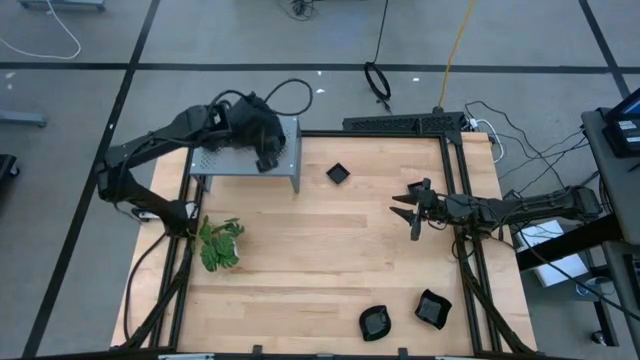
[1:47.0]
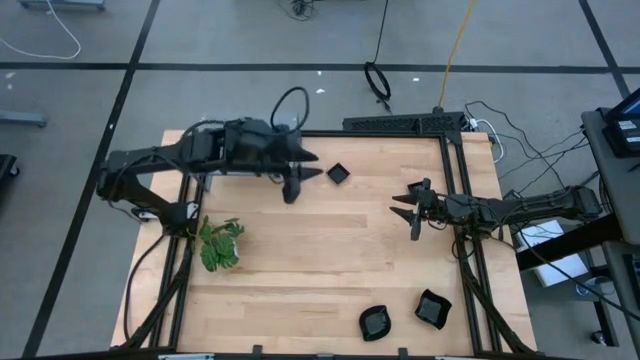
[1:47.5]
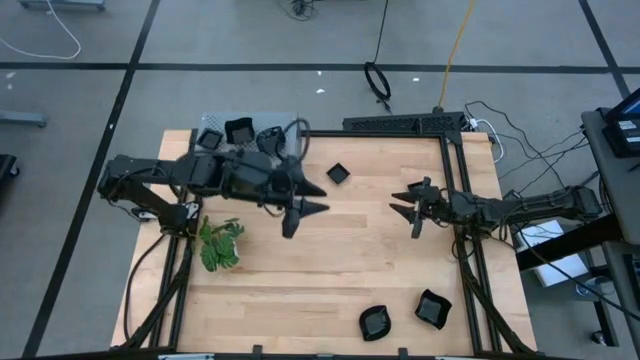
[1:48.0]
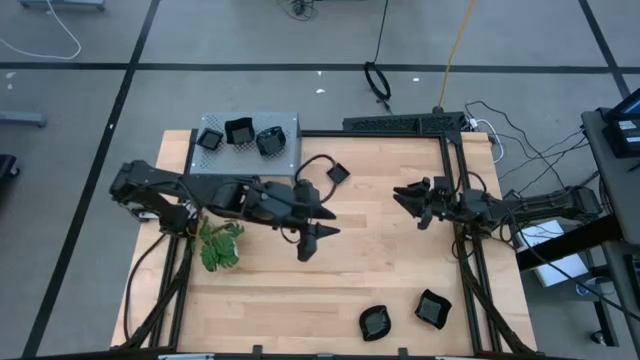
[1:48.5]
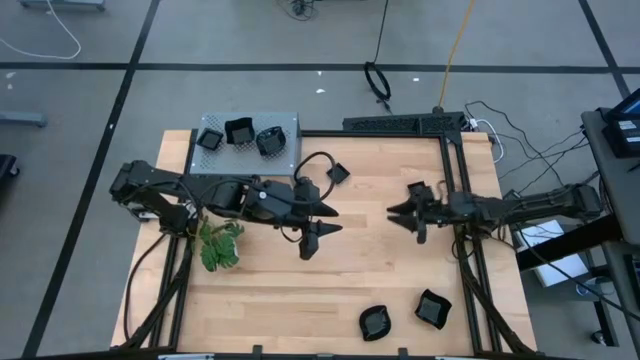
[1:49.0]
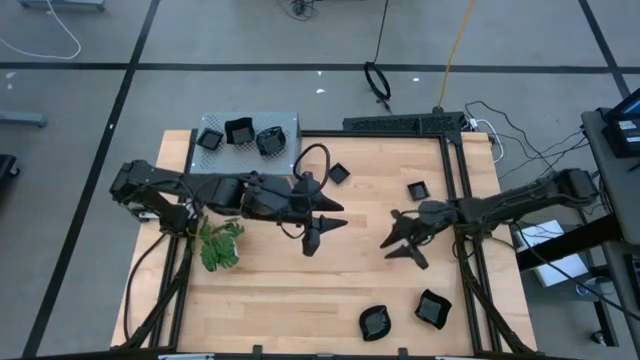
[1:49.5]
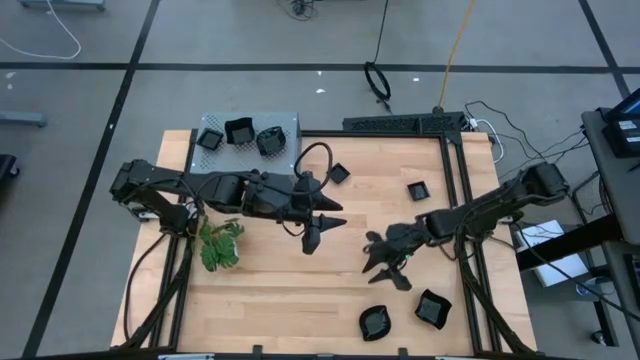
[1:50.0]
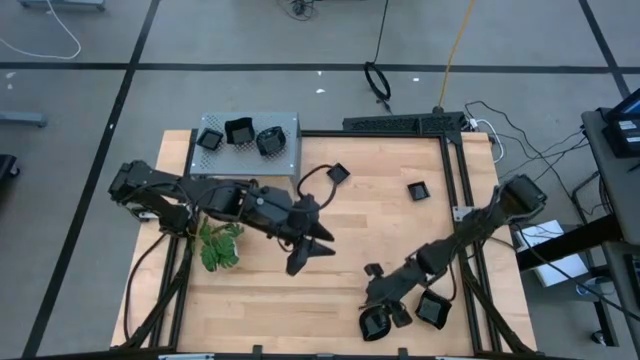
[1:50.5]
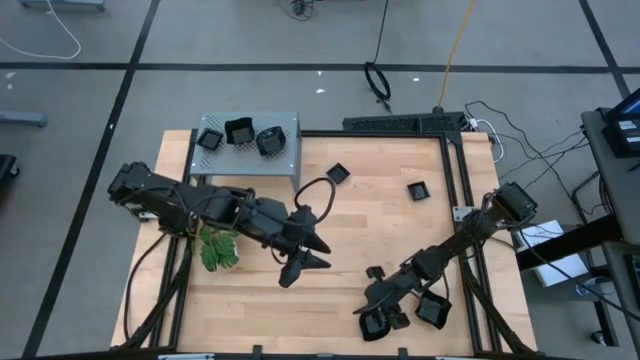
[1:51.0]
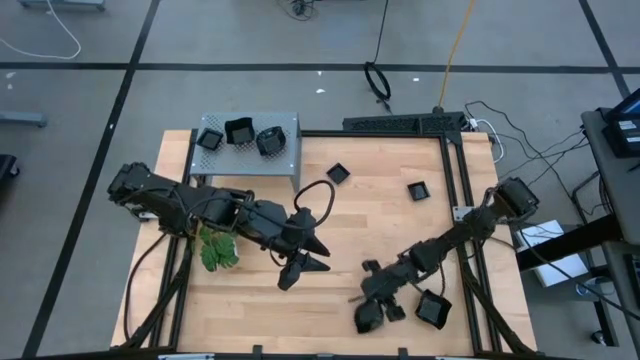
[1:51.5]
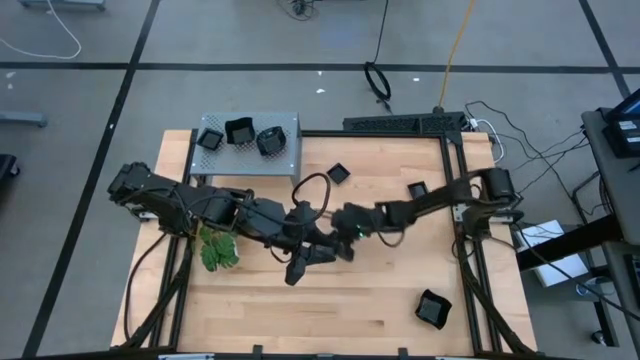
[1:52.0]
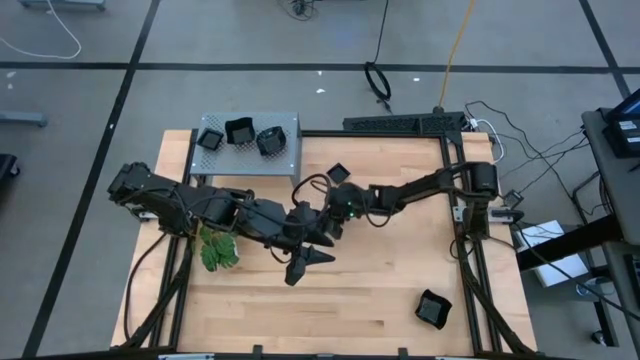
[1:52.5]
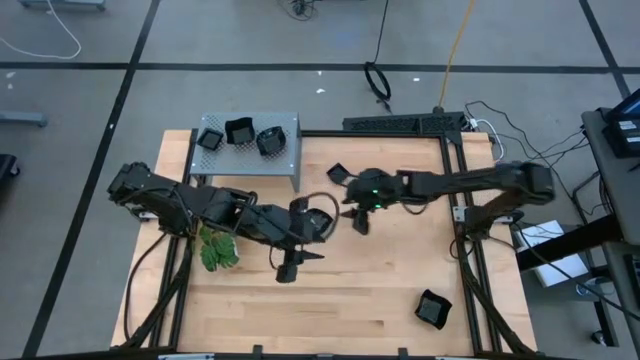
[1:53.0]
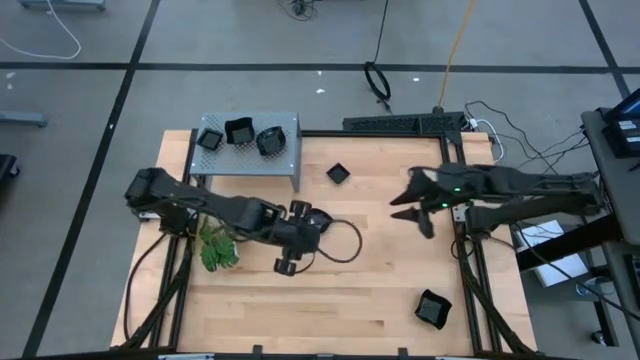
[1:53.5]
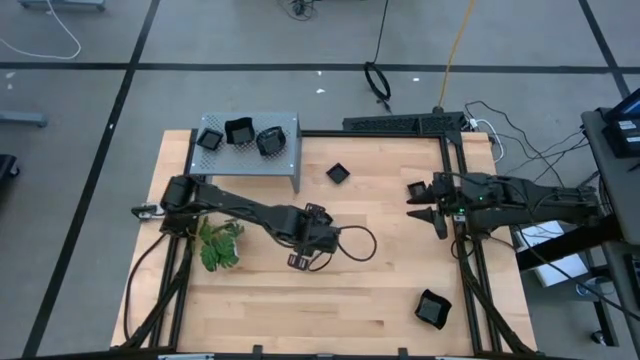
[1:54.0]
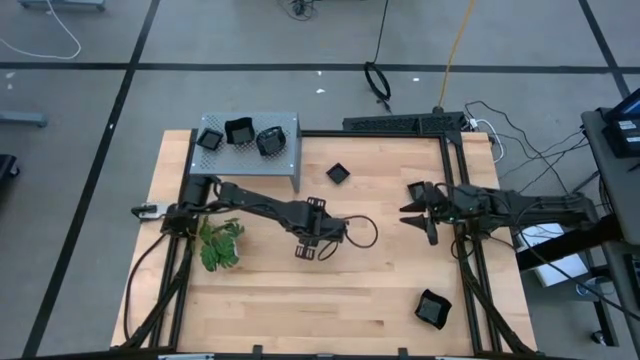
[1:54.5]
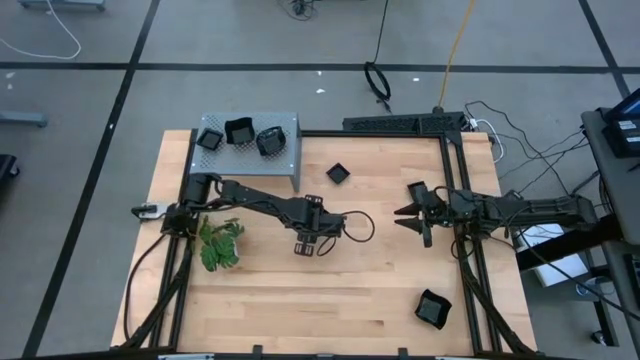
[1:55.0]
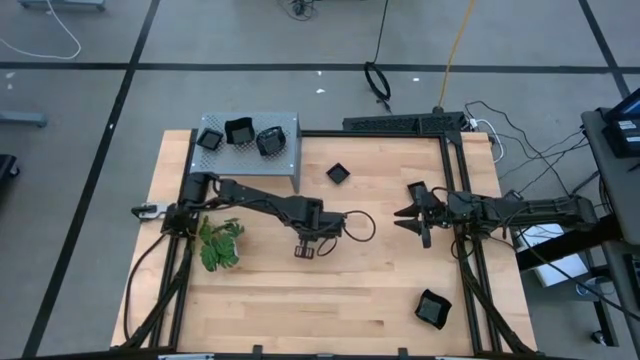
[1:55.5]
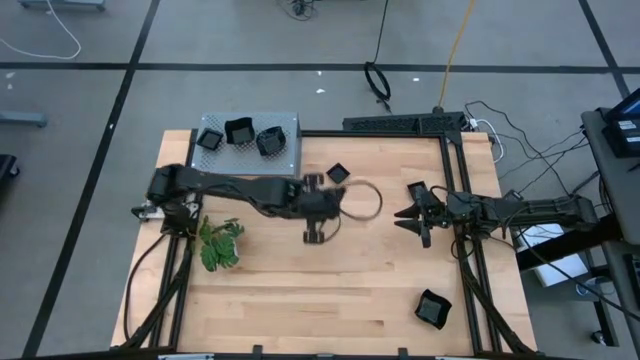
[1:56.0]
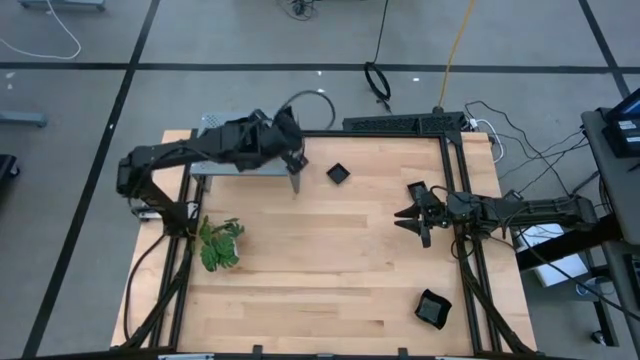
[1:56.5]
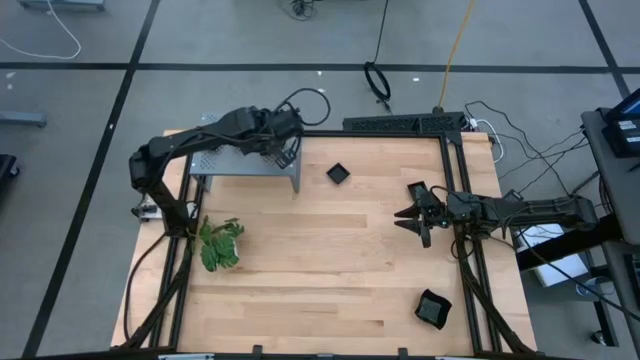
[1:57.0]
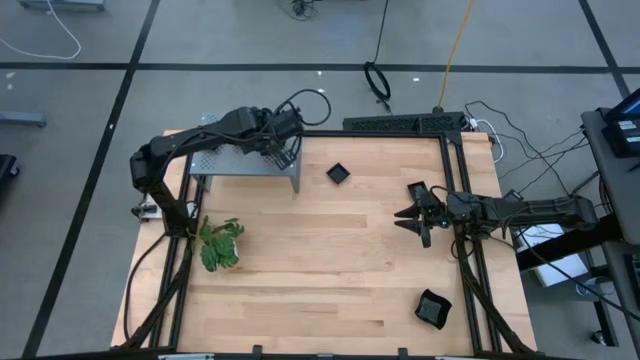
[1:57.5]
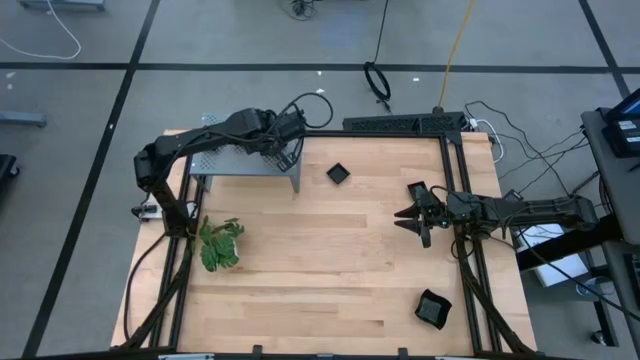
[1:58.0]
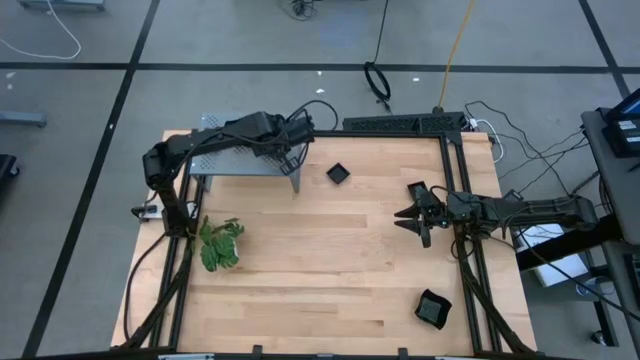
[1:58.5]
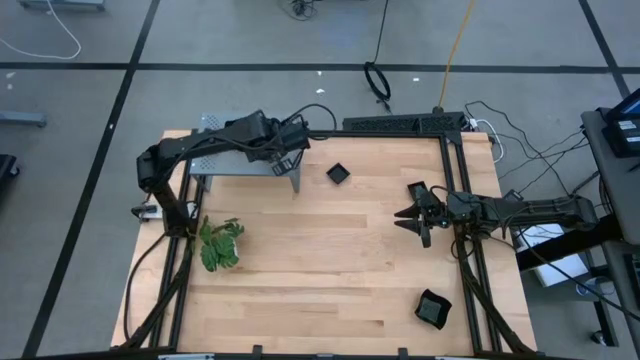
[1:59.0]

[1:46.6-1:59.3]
Task: Pick & Place Mini shaped plates
Stack the leaf-shaped plate on top of the leaf-shaped plate on the shelf

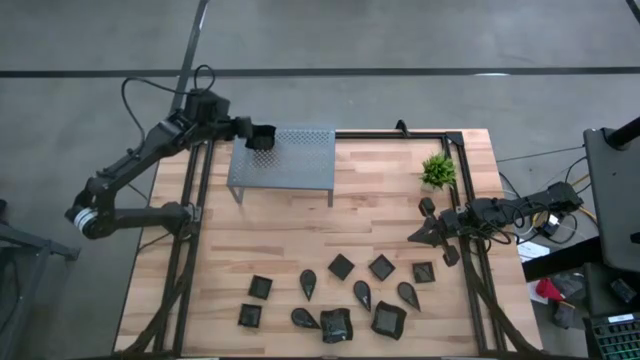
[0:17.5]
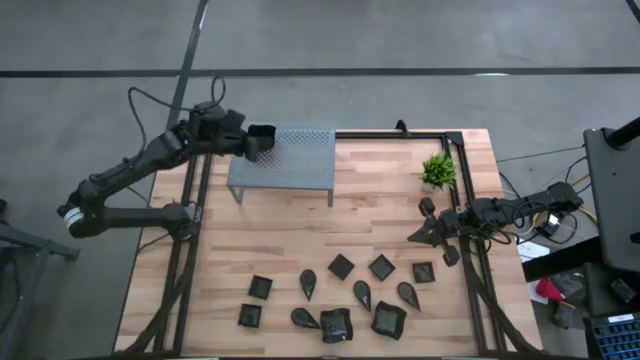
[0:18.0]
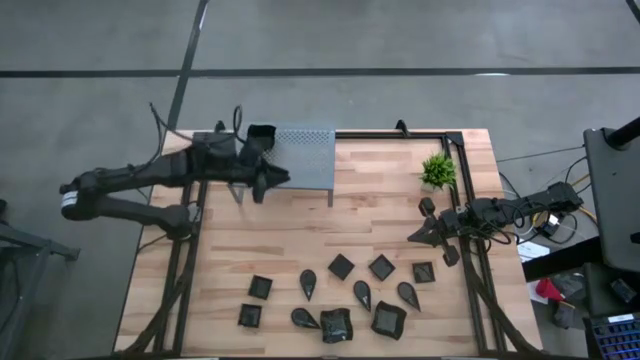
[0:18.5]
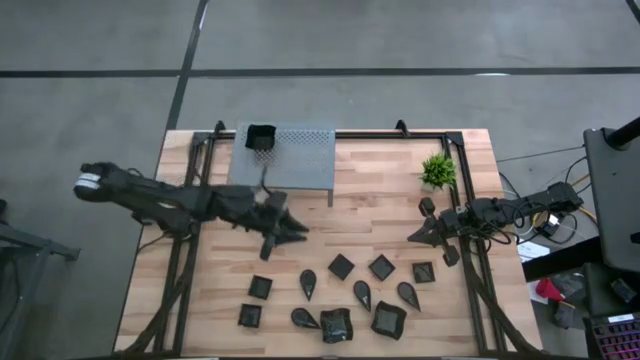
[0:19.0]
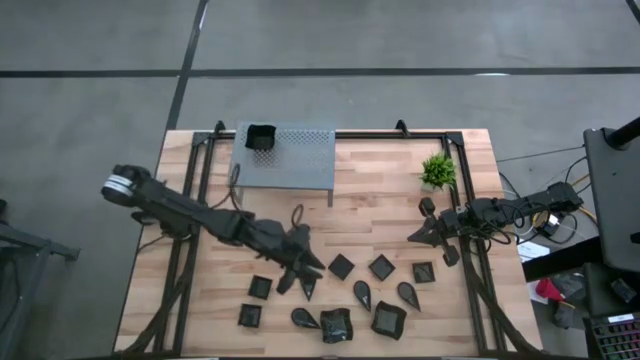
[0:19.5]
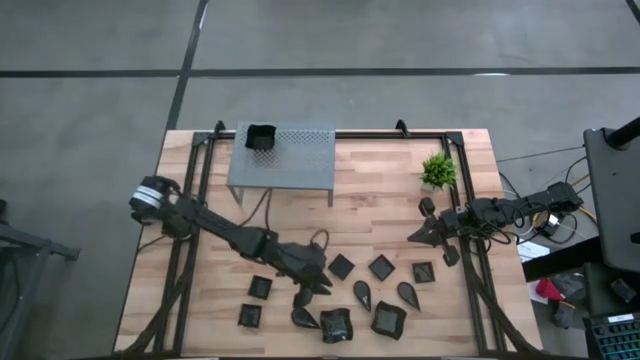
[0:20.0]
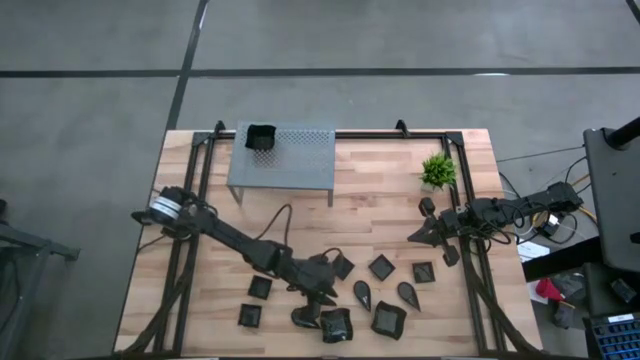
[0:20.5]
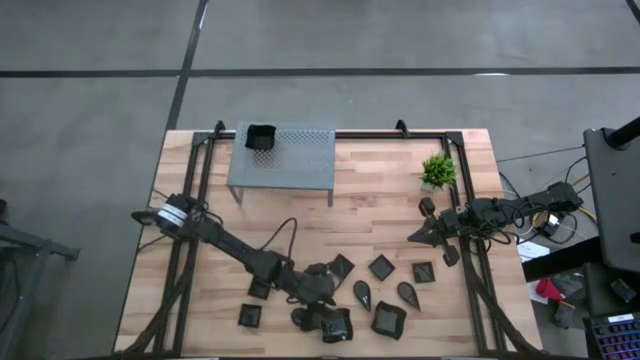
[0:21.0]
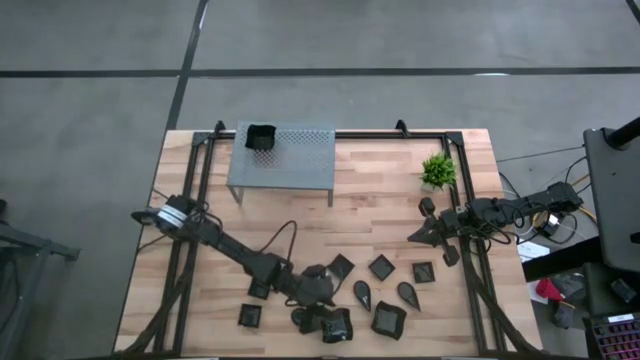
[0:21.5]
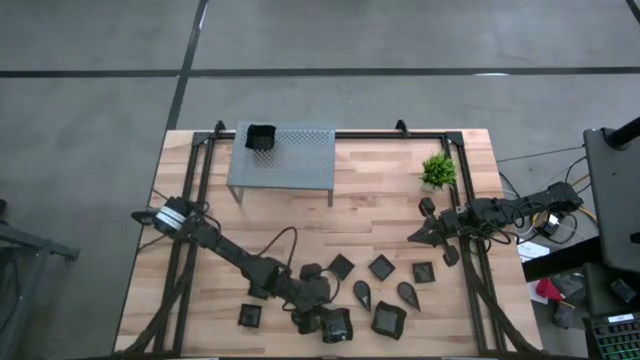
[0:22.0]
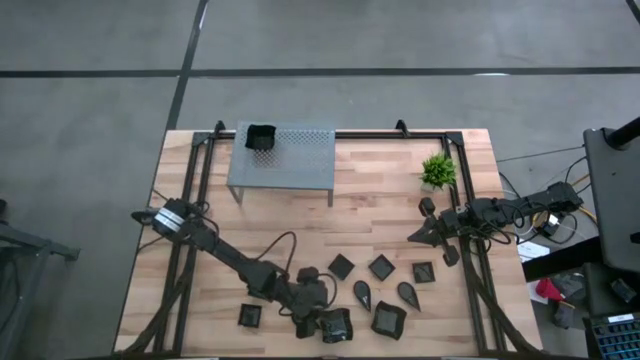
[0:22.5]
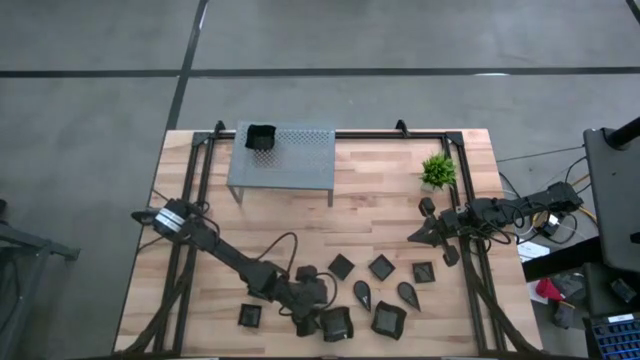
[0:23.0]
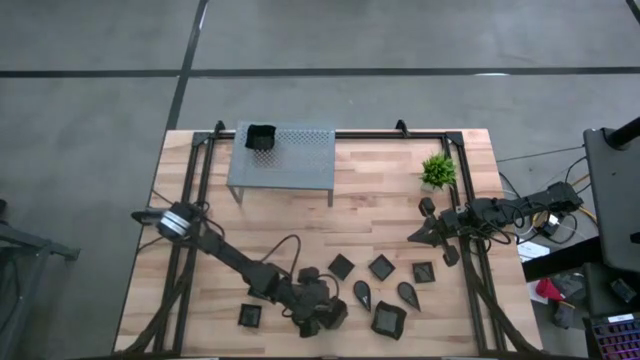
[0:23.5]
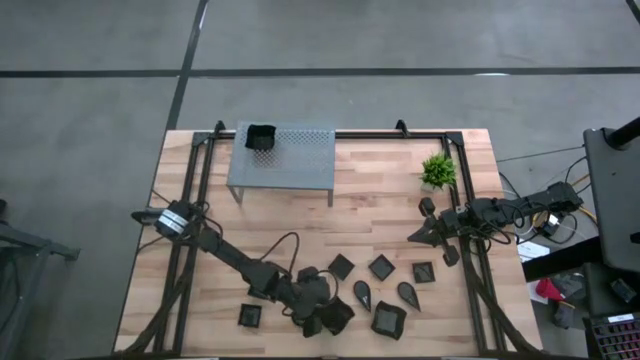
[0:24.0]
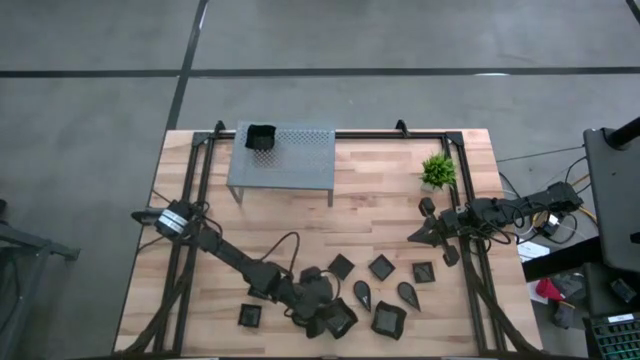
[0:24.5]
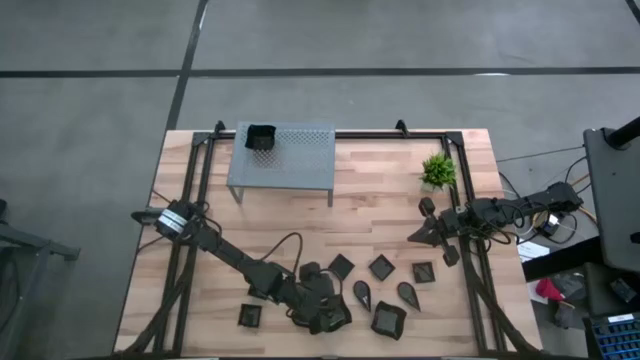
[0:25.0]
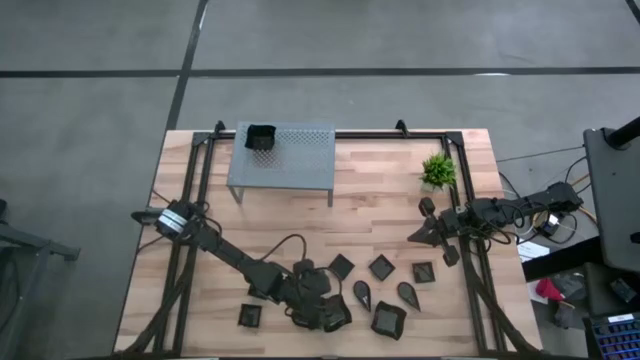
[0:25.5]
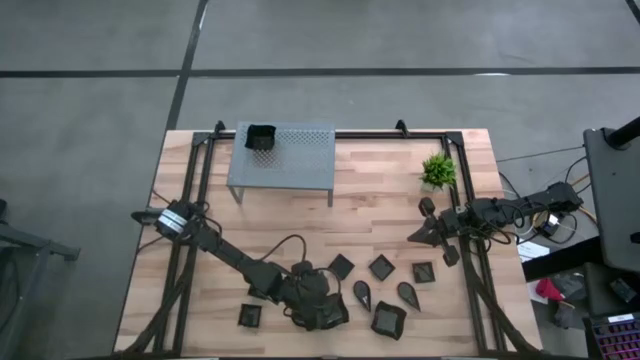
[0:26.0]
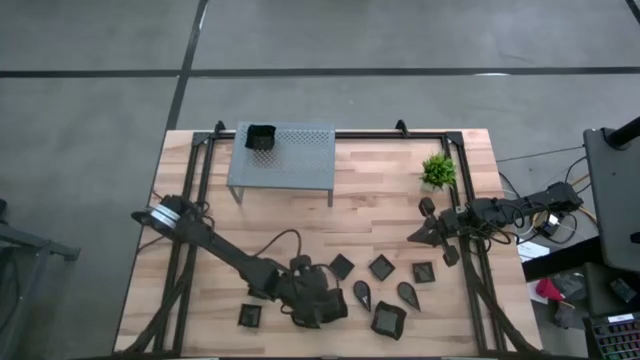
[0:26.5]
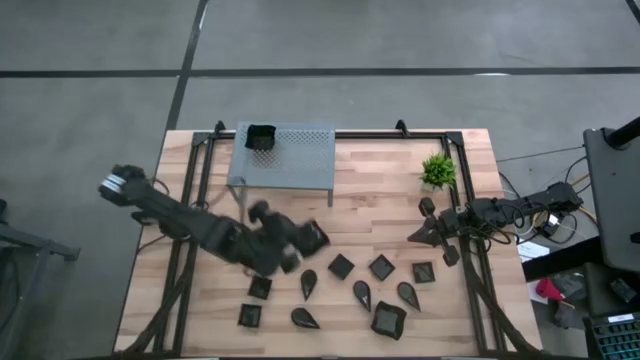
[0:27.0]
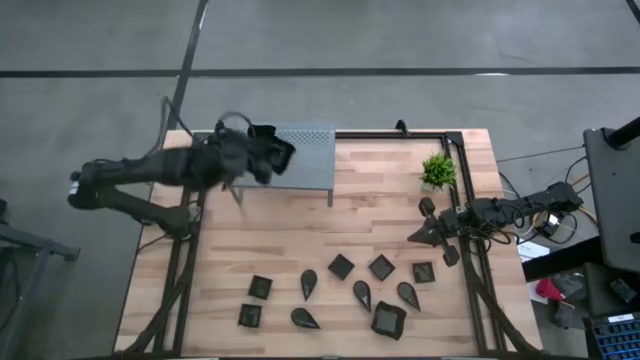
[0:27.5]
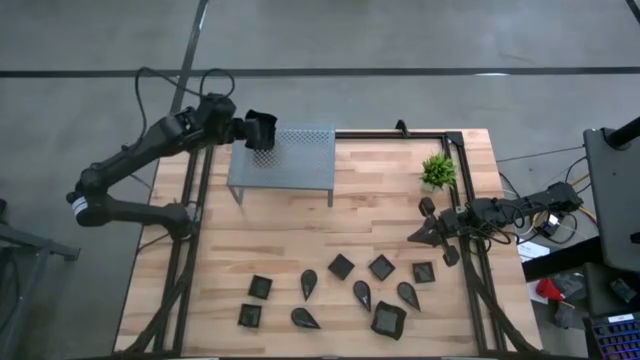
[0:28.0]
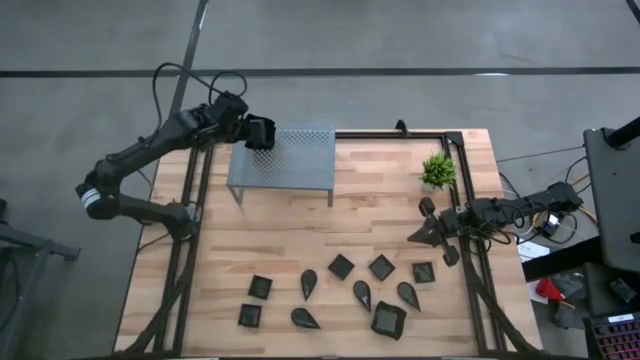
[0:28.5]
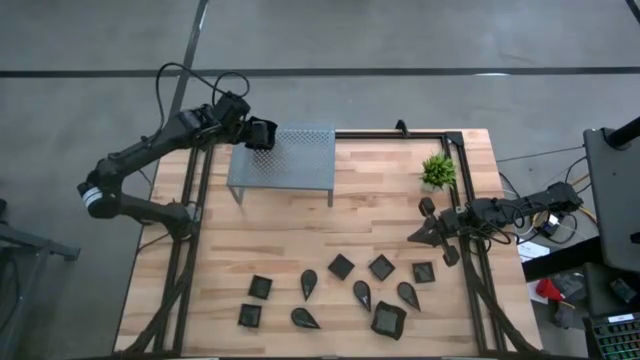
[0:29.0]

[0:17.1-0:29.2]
Task: Pick & Place Mini shaped plates
Stack the black distorted square plate on top of the black distorted square plate on the shelf
